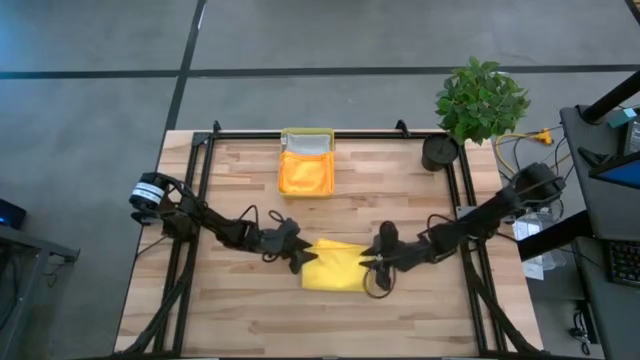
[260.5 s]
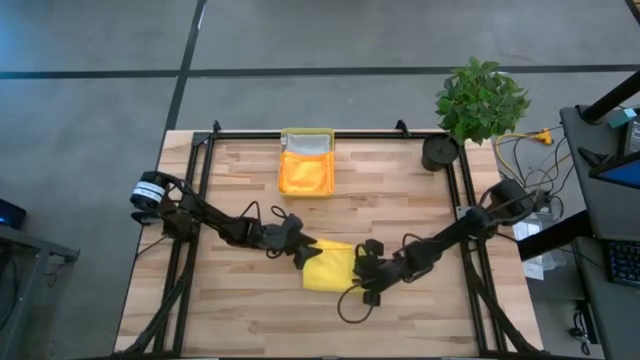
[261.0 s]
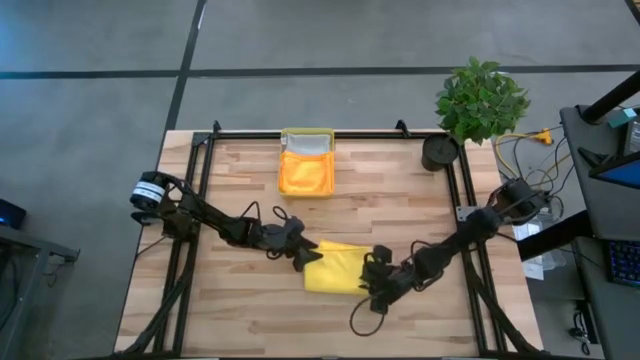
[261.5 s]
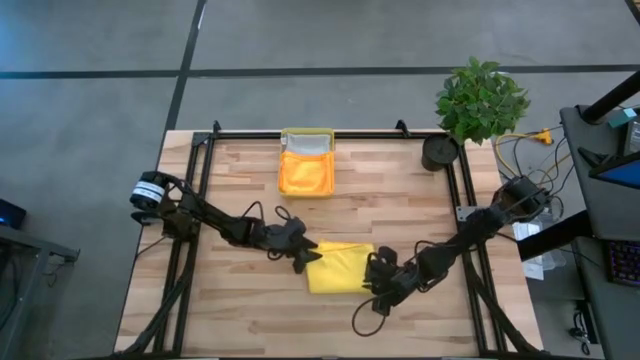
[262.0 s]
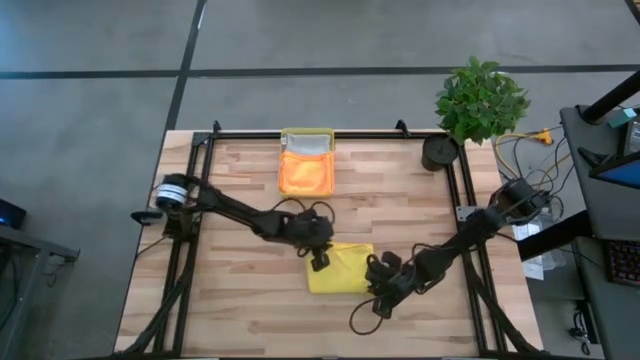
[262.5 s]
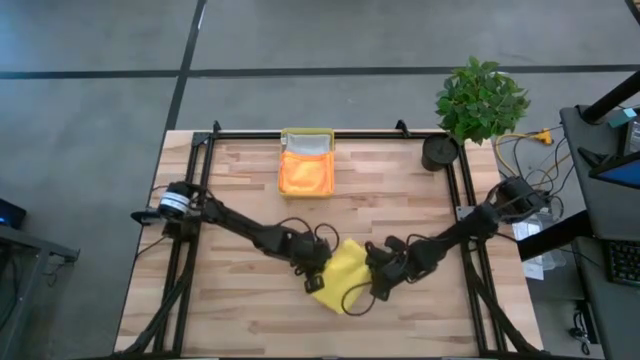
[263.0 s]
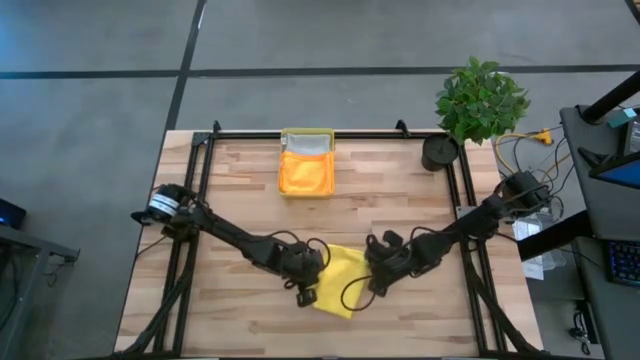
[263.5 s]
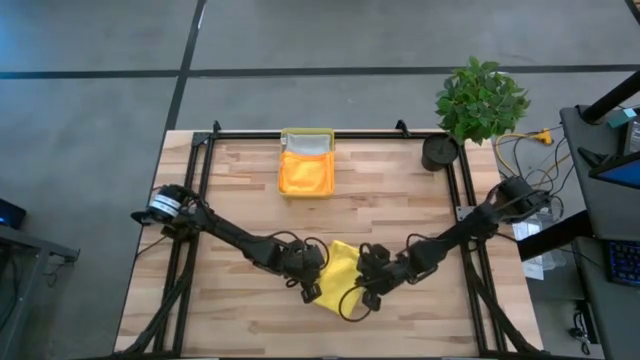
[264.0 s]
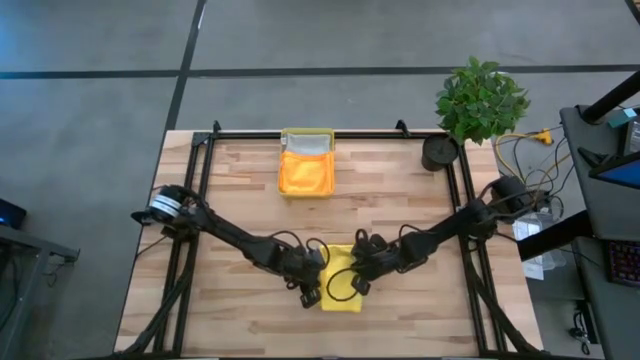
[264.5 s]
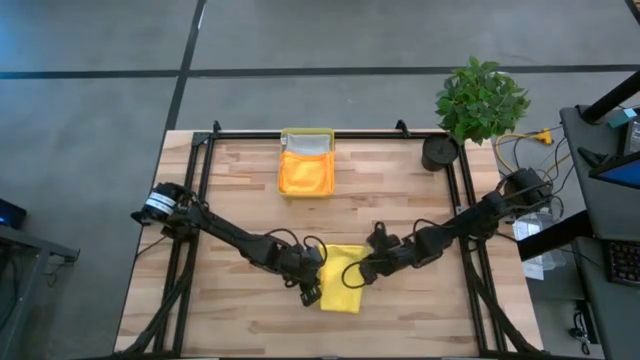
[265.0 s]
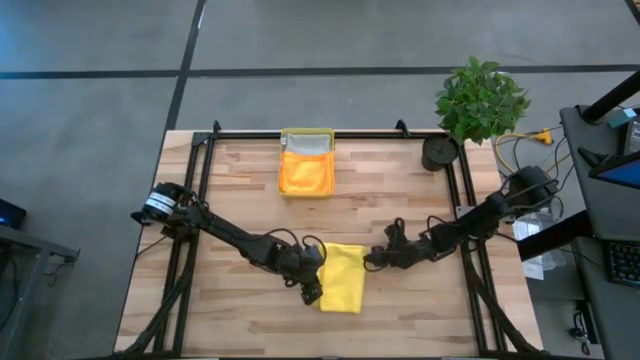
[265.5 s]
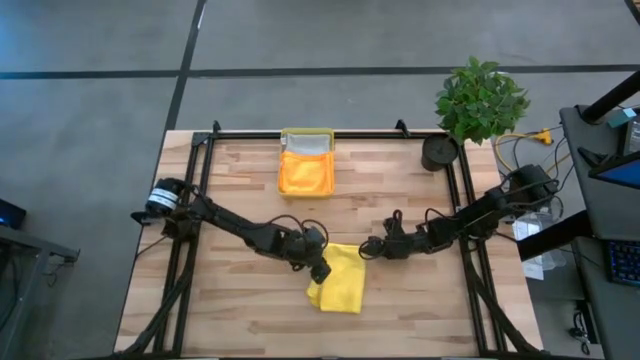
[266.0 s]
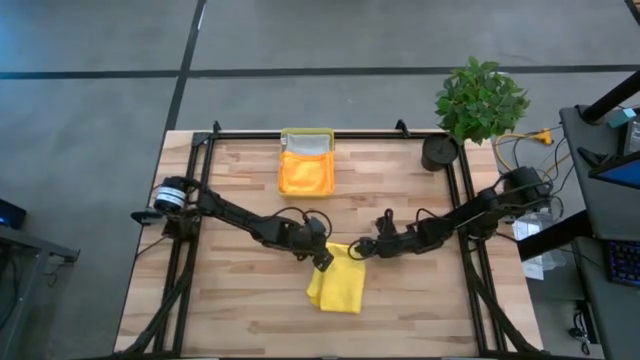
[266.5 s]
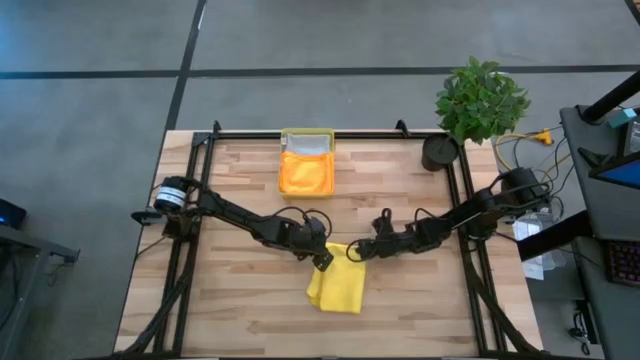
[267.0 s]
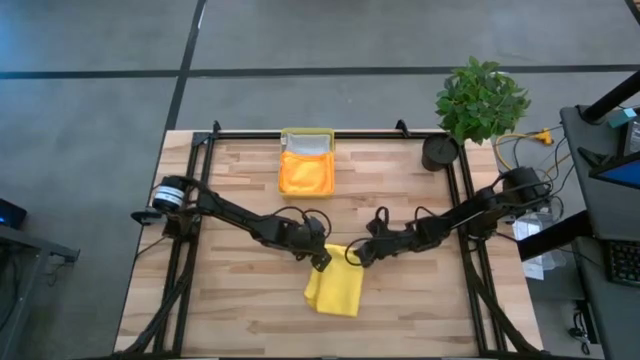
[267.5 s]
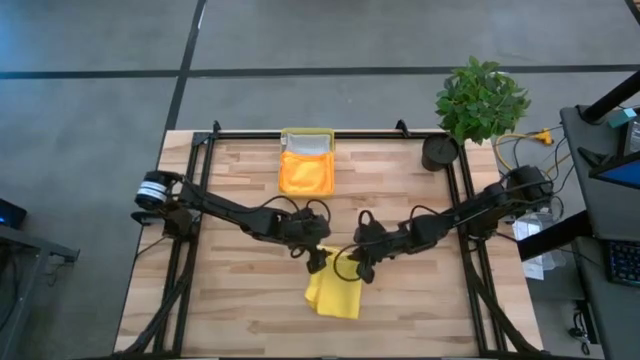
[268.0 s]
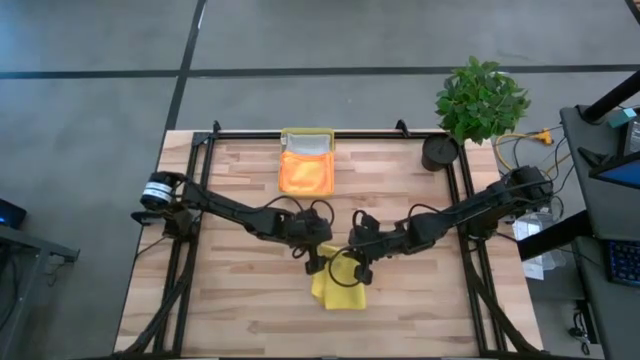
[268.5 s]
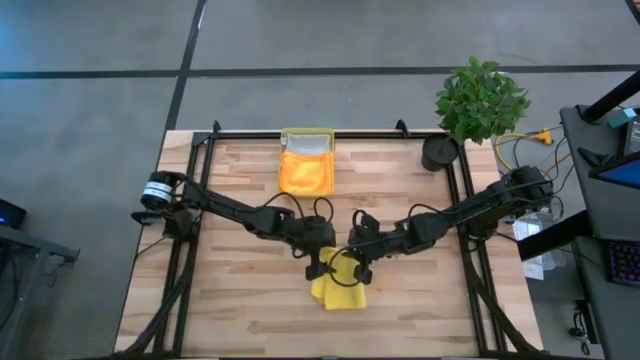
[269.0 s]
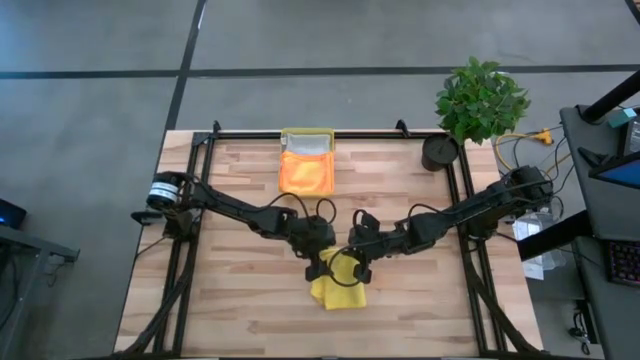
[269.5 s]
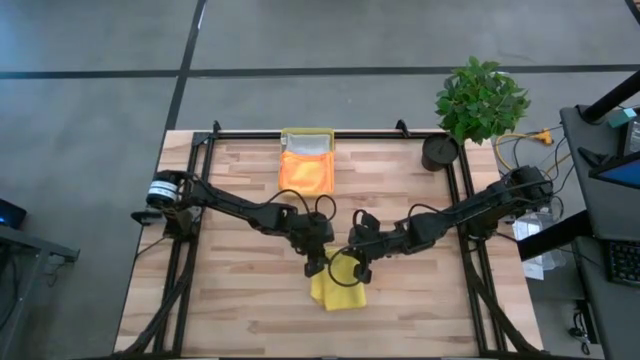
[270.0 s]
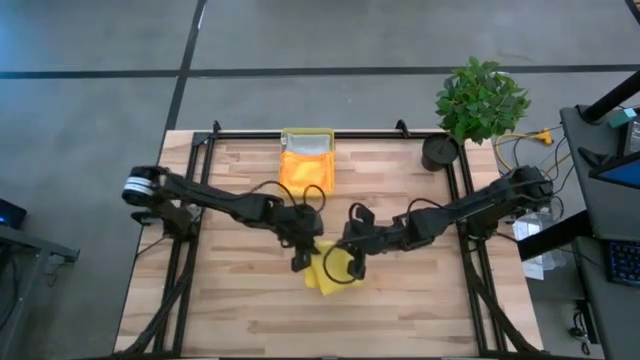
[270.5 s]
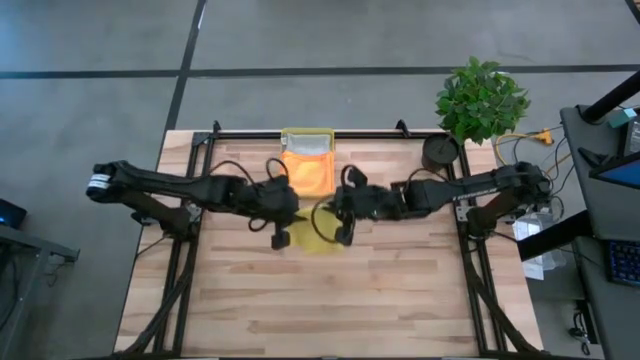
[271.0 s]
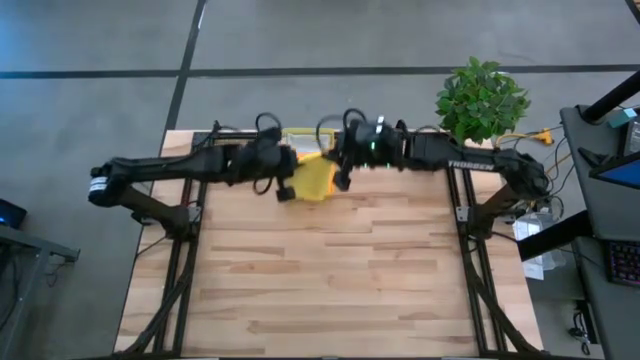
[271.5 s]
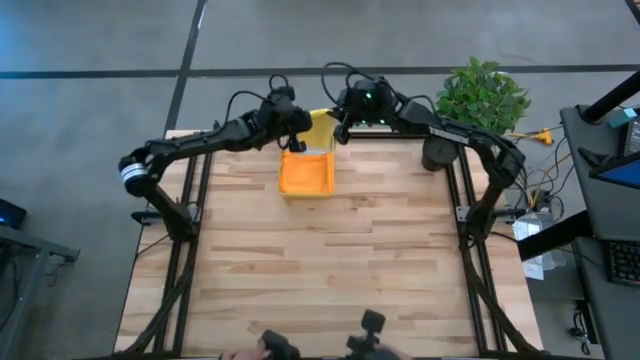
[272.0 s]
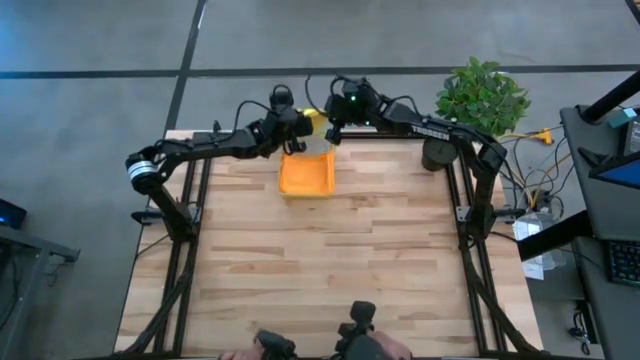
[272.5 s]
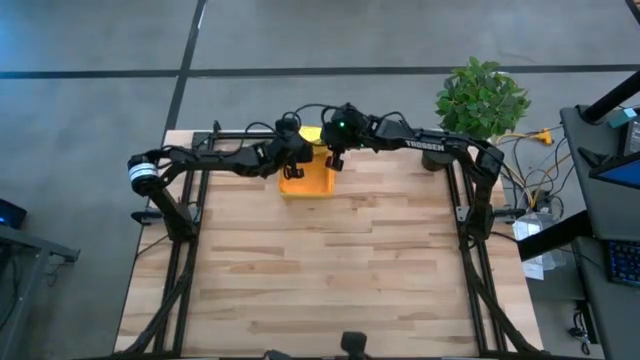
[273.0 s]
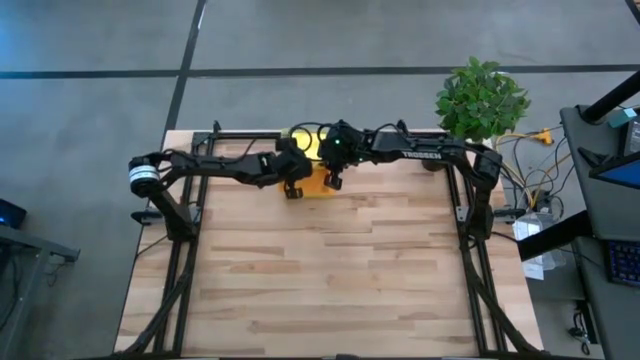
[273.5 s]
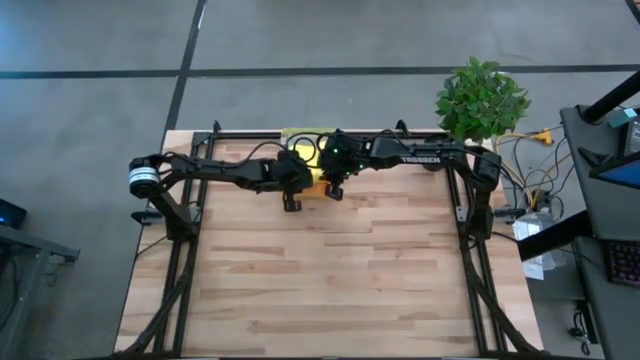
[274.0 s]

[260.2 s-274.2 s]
Task: Fold microfiber towels
Stack the folded yellow microfiber cloth on top of the gray microfiber cloth

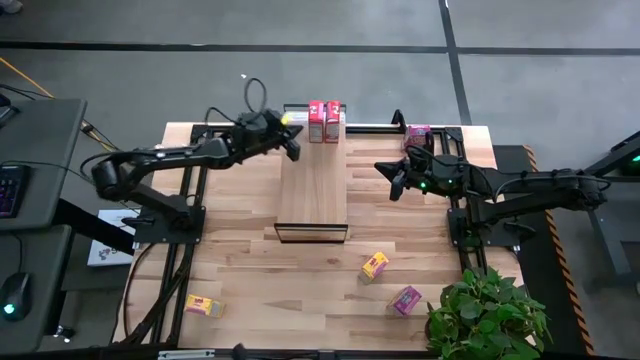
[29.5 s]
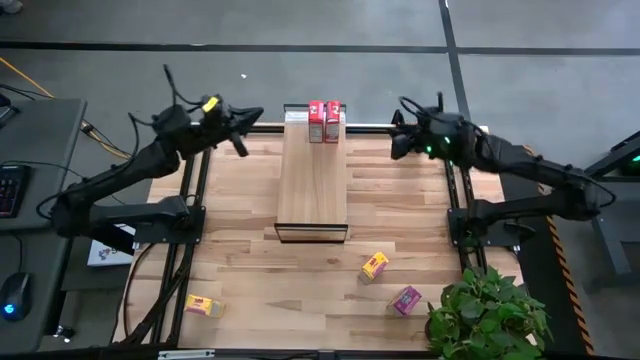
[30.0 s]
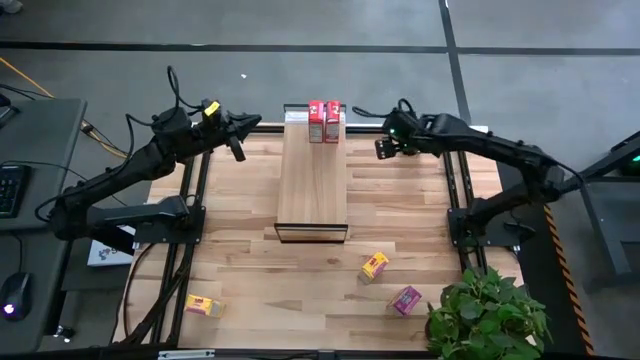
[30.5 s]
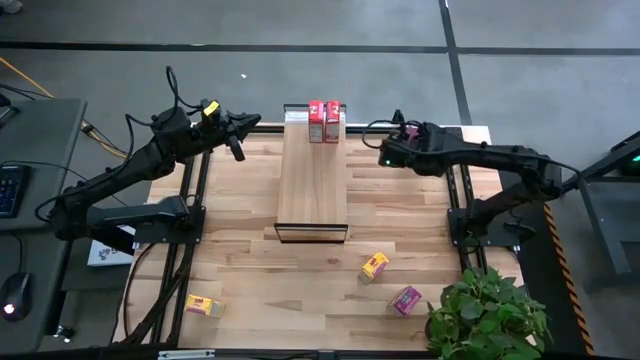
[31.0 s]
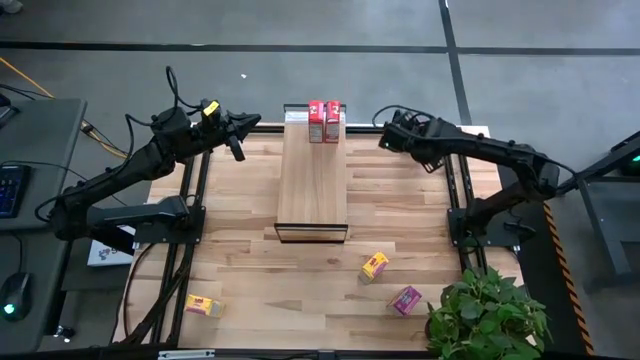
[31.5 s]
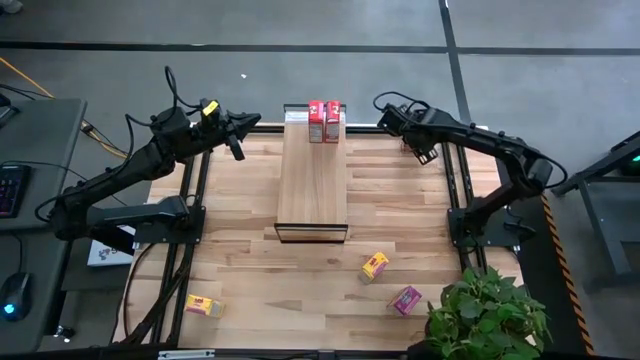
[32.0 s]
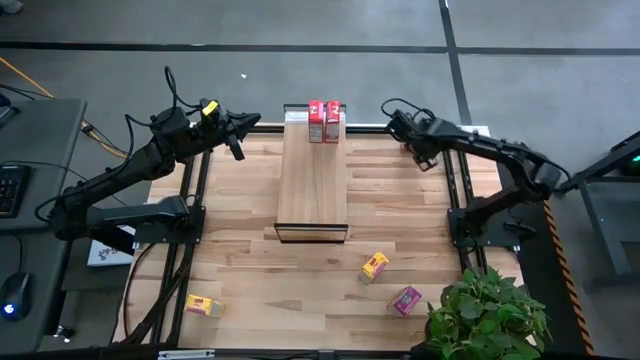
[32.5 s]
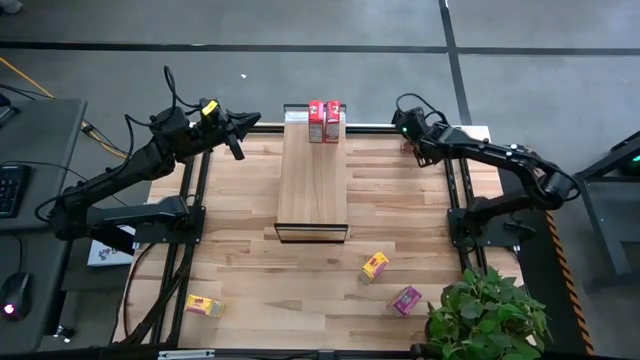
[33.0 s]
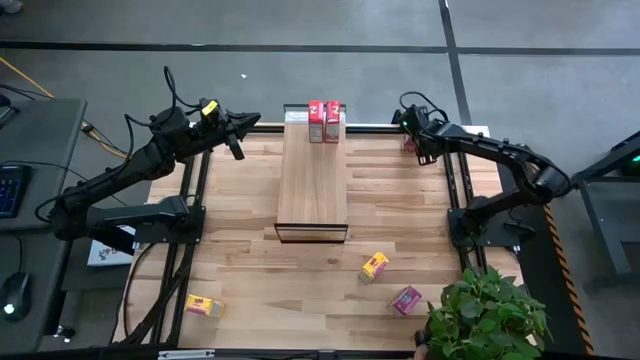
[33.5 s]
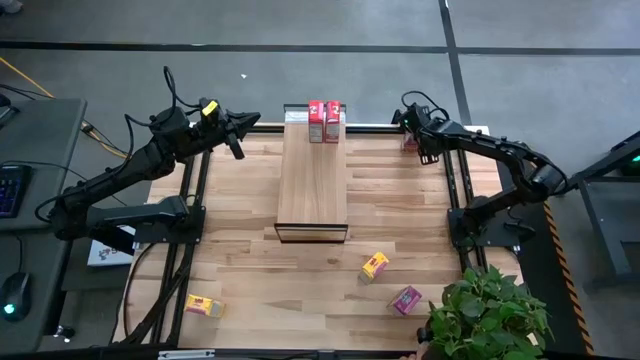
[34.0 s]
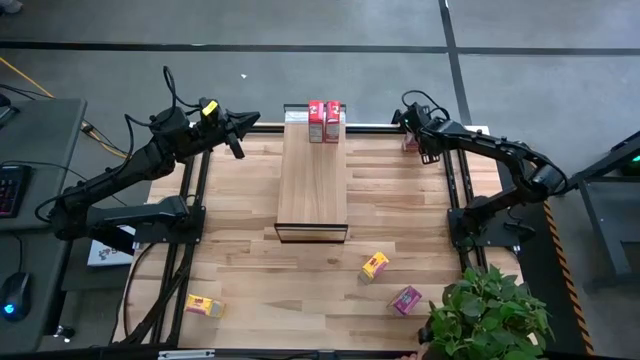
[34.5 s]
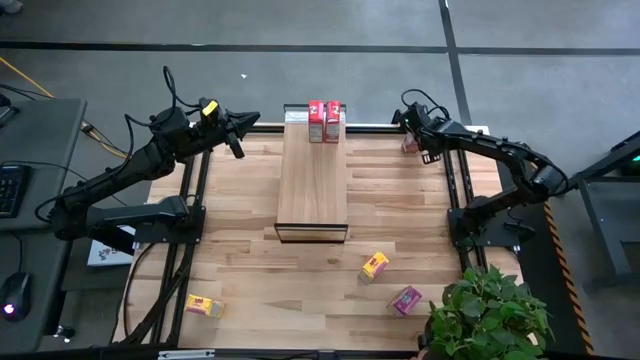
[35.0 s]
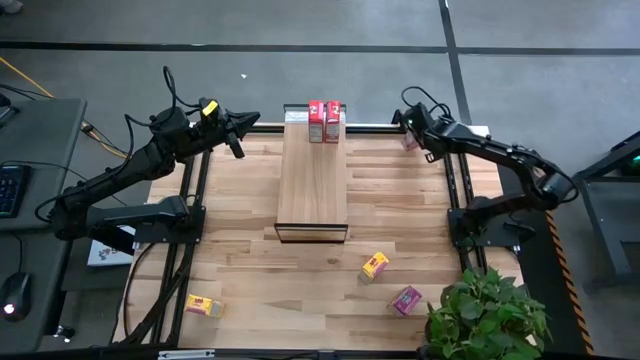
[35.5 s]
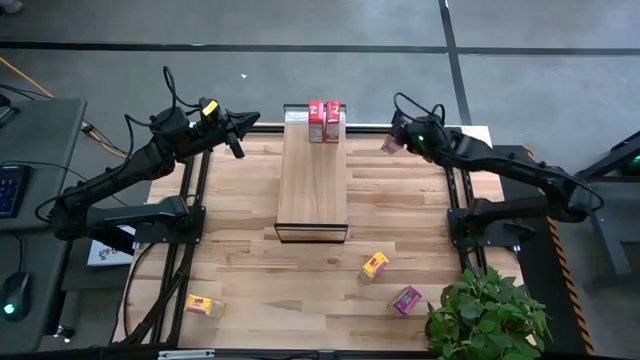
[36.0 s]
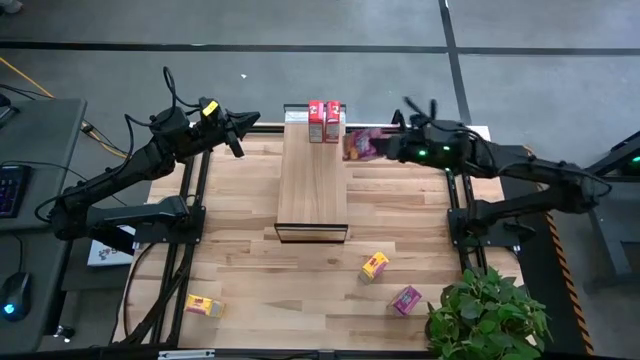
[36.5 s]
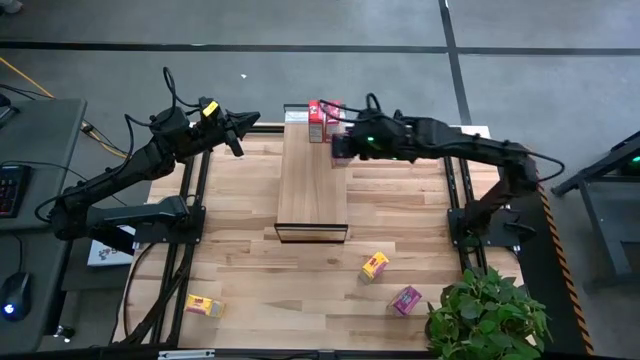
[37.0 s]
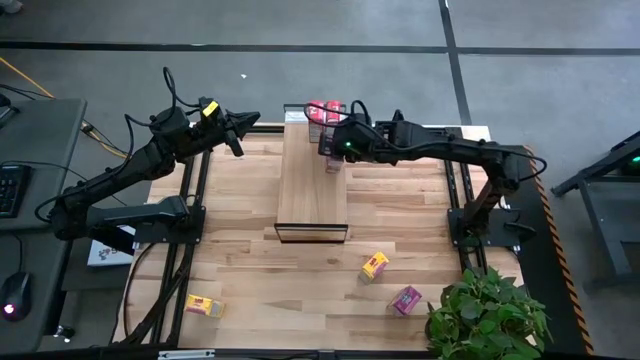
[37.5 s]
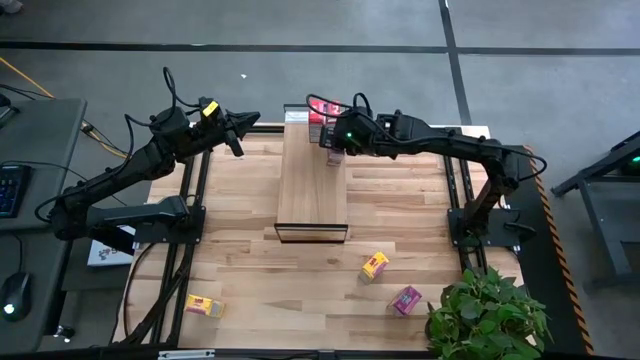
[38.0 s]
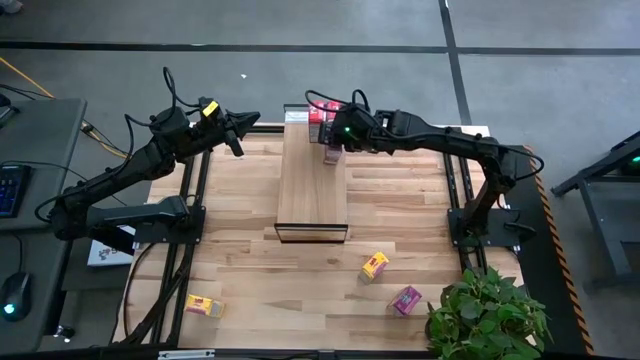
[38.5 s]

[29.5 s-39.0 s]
Task: Stack cereal on shelf
Put the top purple cereal box on the shelf
